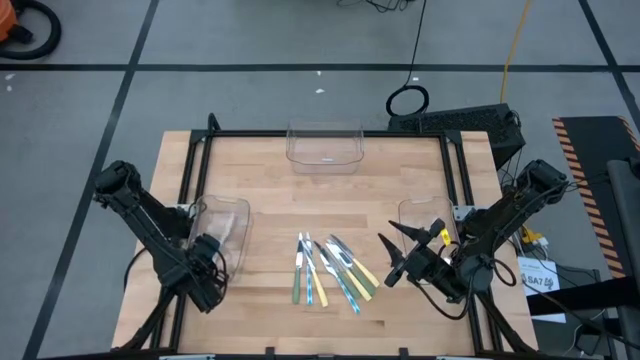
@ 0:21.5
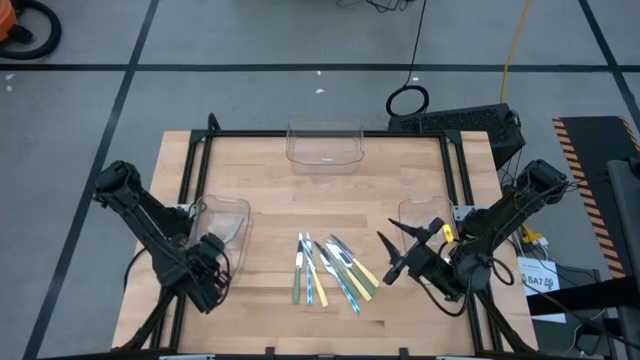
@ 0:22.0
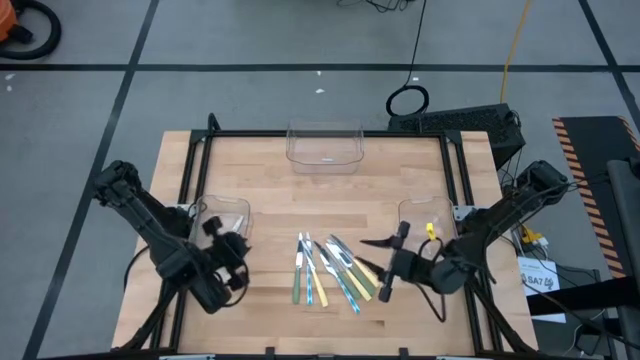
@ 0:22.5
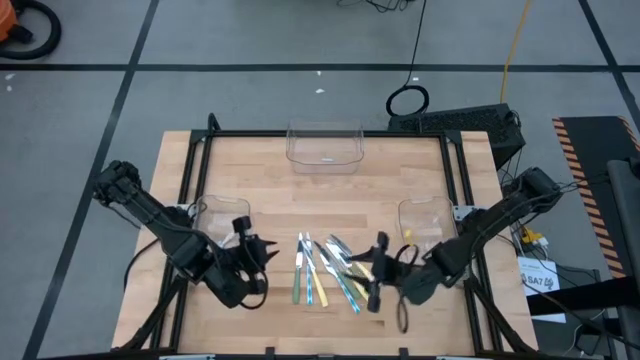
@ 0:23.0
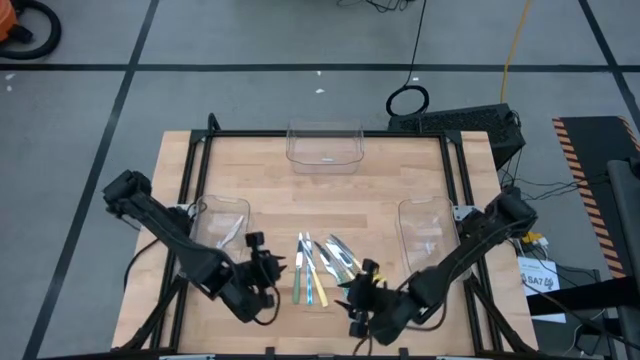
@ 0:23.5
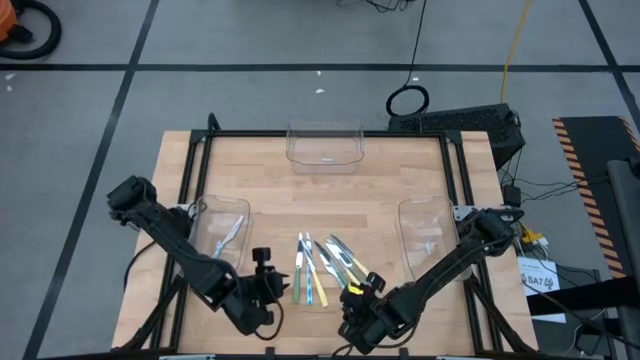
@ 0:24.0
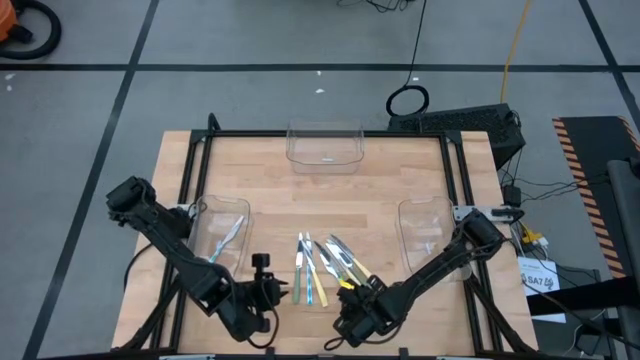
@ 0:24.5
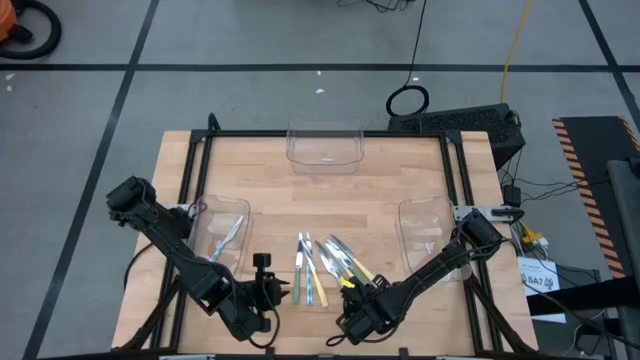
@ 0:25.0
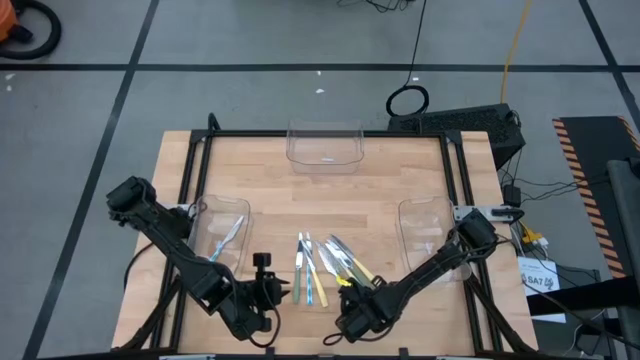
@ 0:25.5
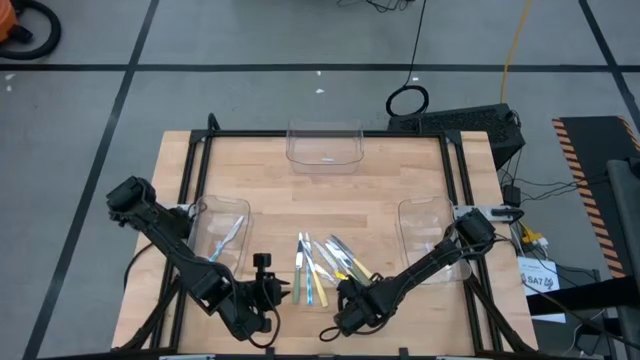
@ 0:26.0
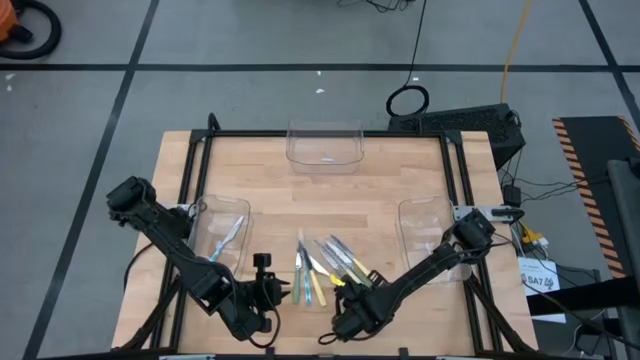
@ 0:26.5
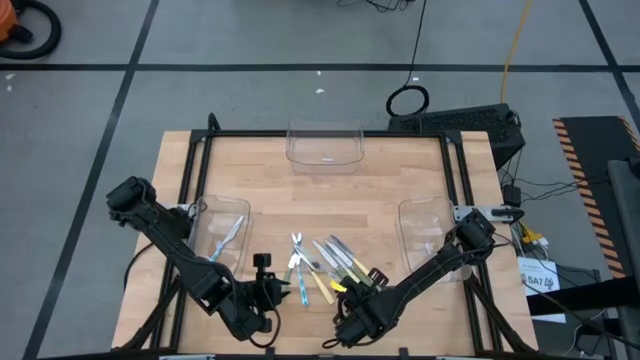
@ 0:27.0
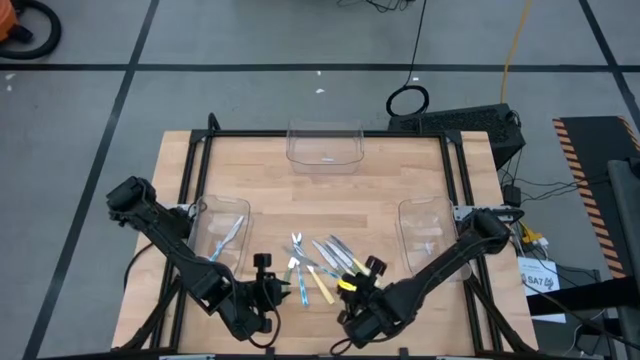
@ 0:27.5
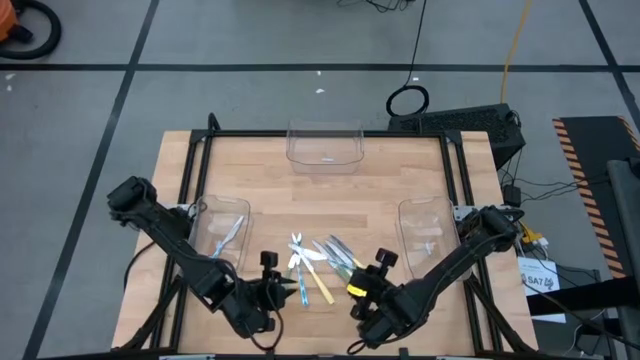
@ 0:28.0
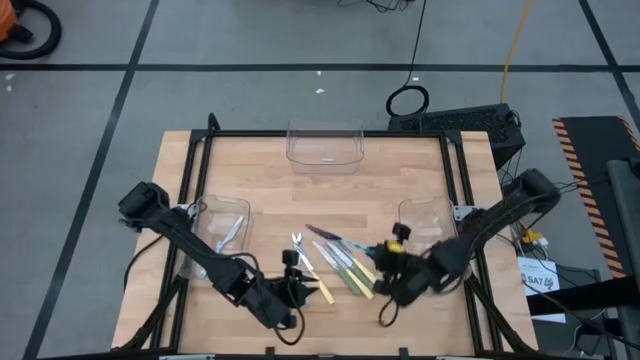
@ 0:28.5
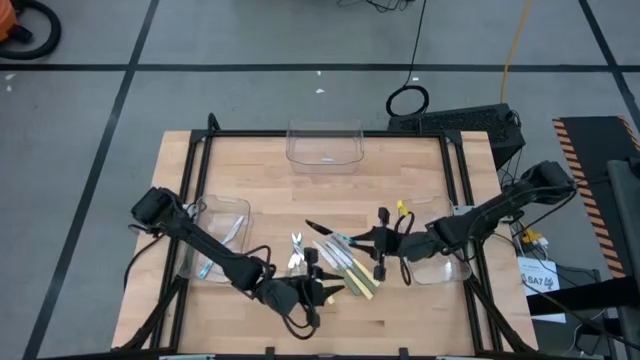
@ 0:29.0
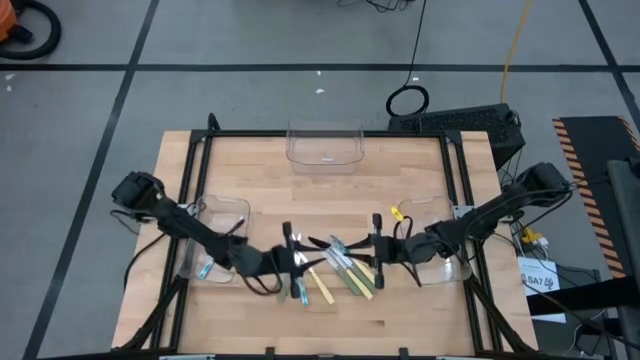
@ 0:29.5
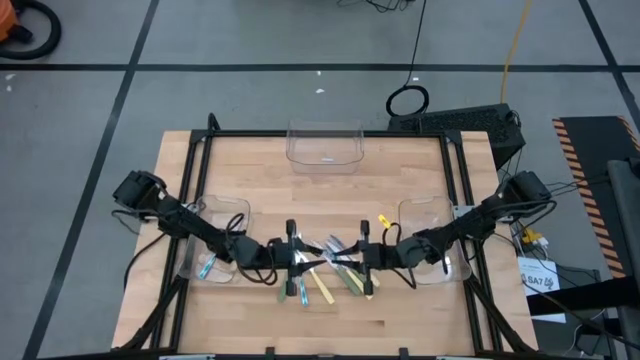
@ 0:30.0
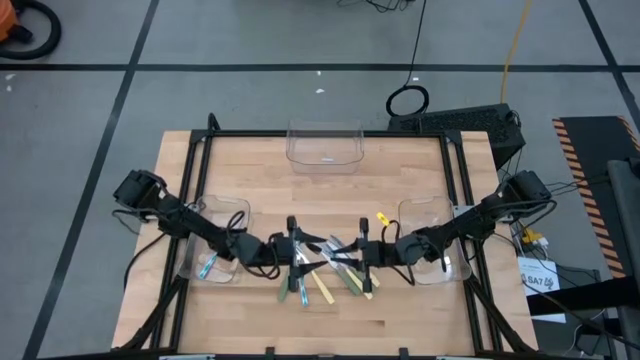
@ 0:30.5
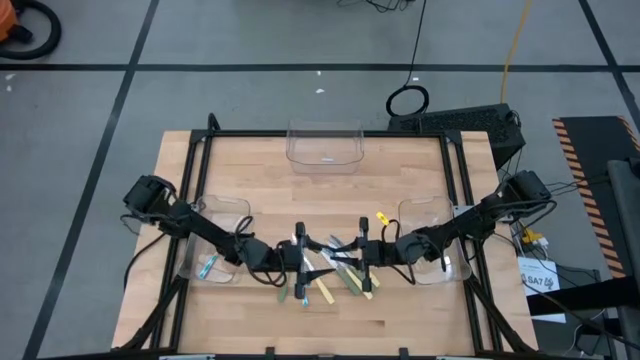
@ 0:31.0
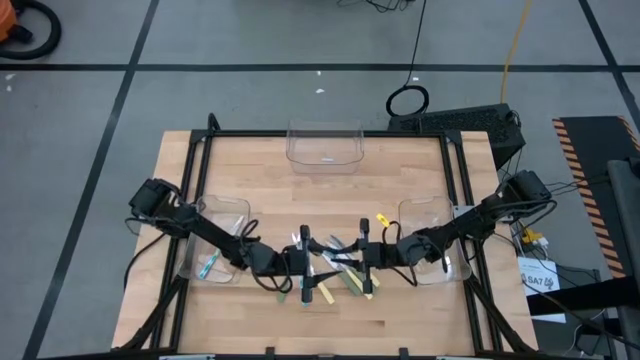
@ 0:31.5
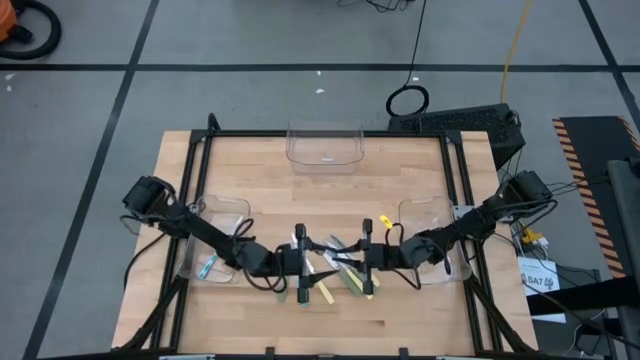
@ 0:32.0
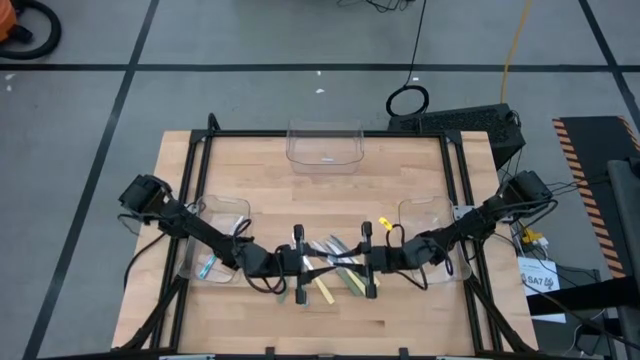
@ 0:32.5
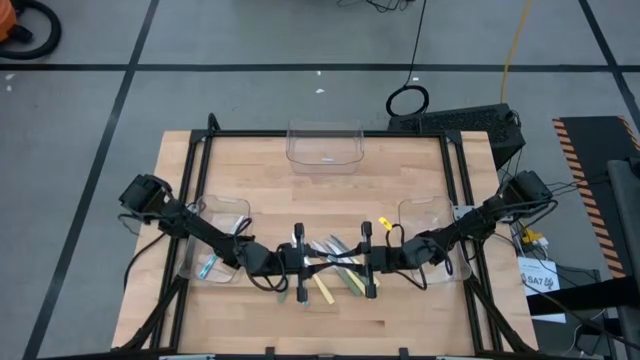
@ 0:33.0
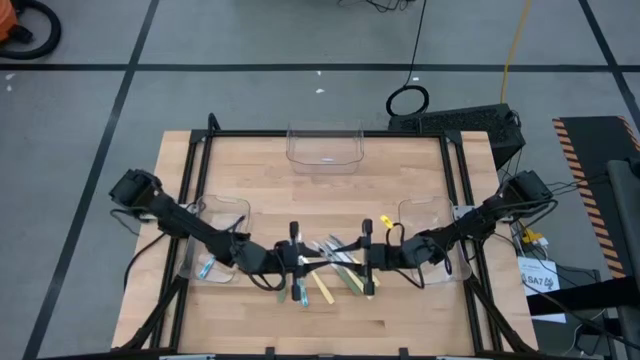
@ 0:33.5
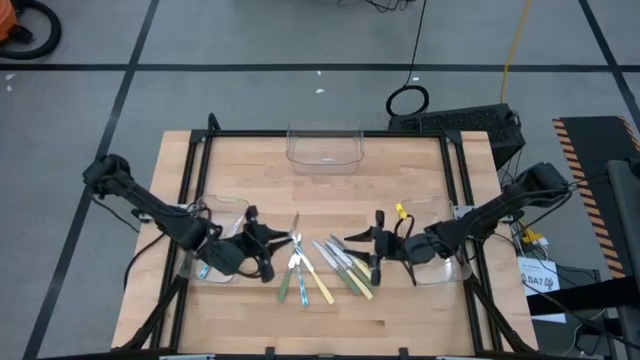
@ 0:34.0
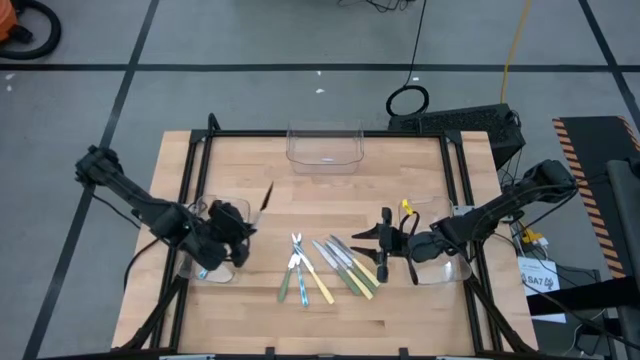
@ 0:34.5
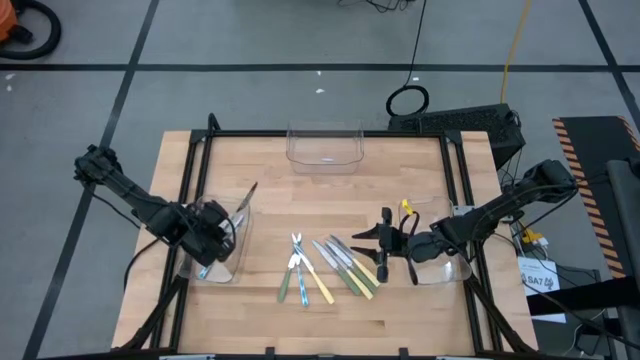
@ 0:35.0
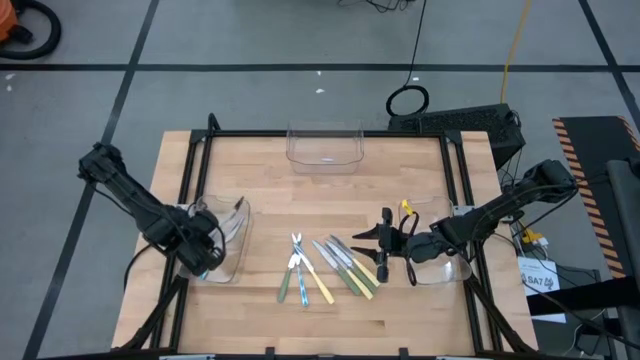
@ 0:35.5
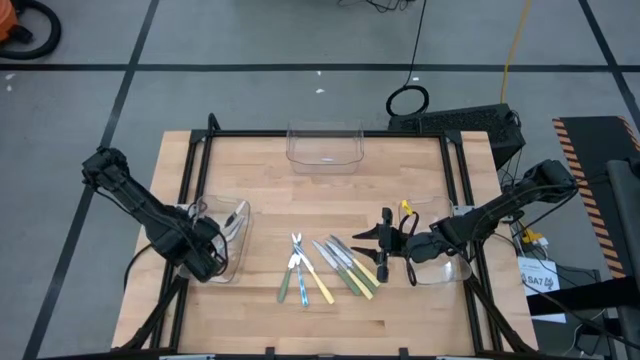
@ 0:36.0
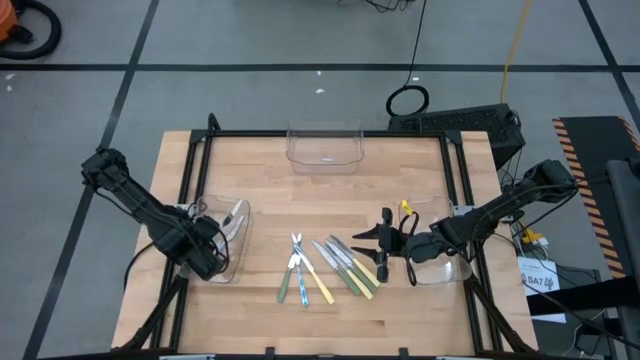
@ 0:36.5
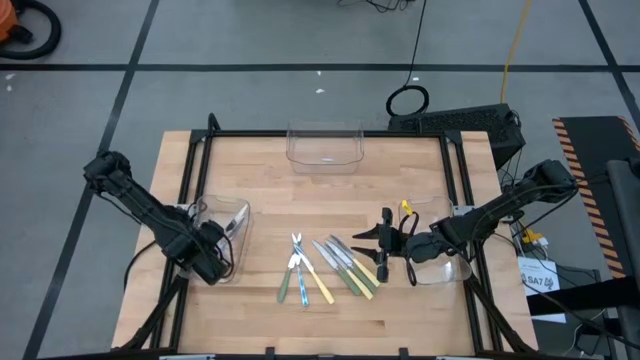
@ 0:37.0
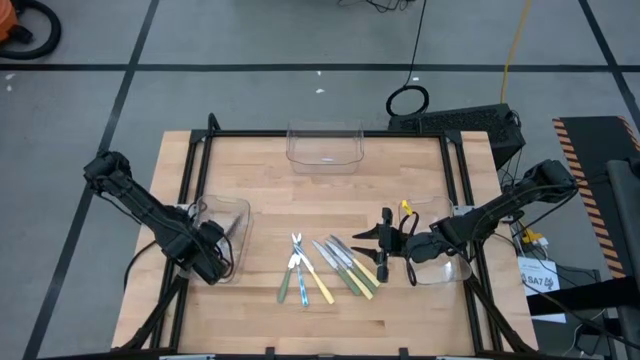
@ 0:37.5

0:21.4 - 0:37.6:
Task: Sort silverware by color (type)
Put the right white and blue patterned knife into the bottom left transparent bin

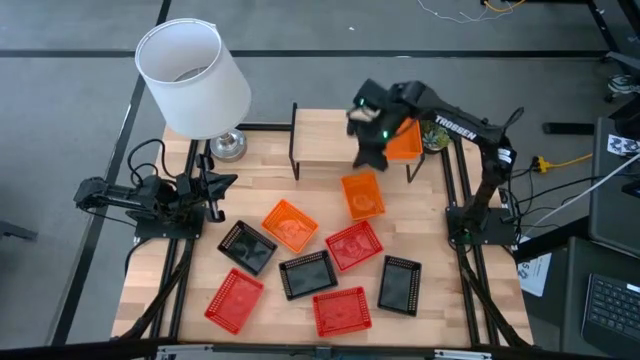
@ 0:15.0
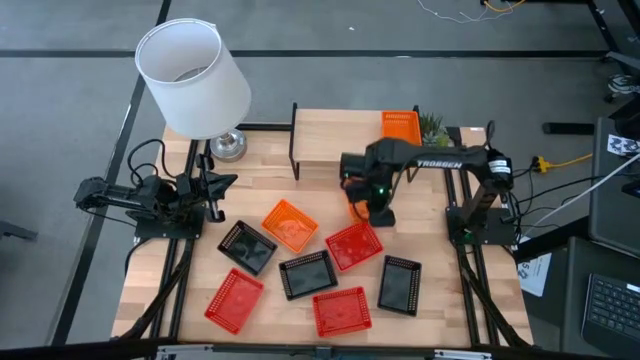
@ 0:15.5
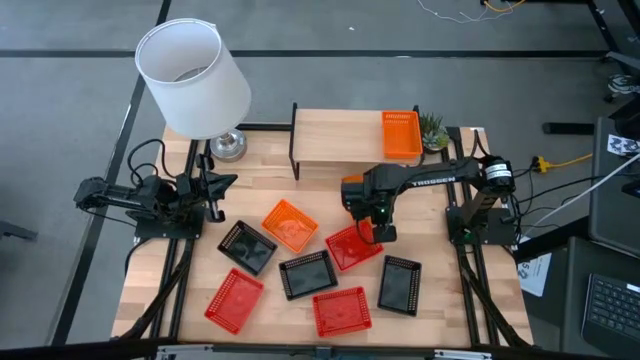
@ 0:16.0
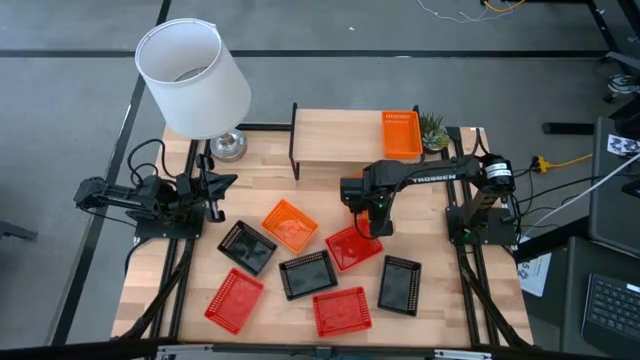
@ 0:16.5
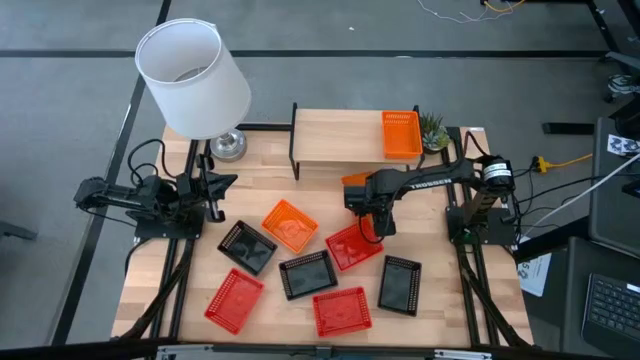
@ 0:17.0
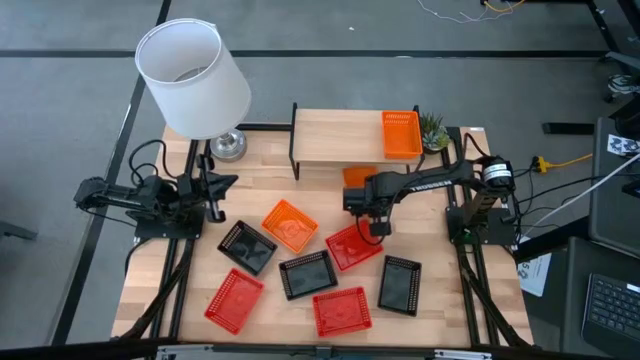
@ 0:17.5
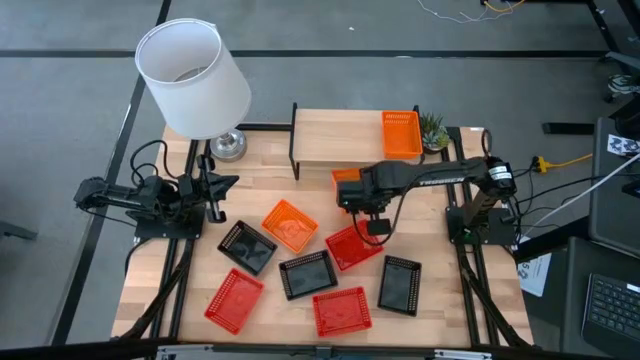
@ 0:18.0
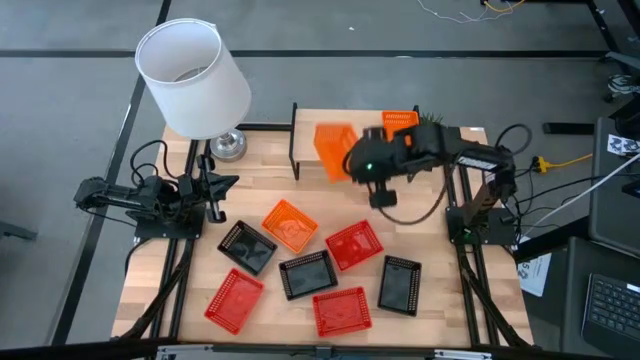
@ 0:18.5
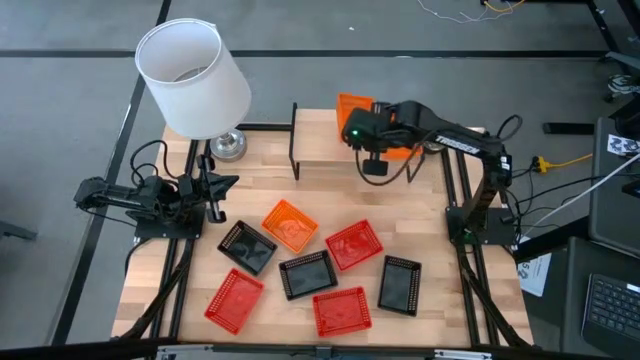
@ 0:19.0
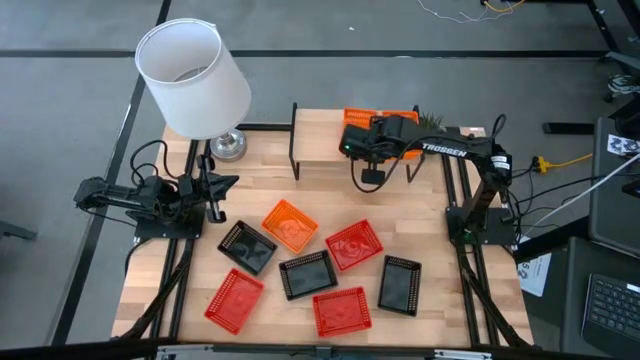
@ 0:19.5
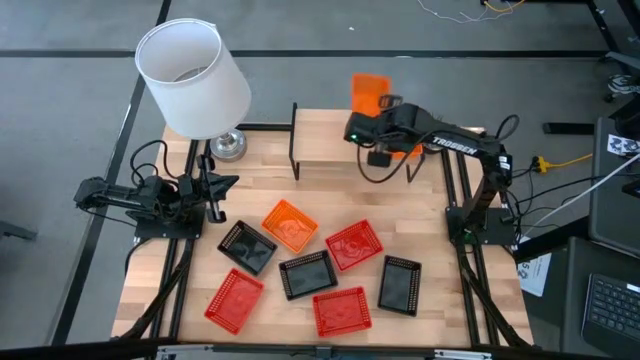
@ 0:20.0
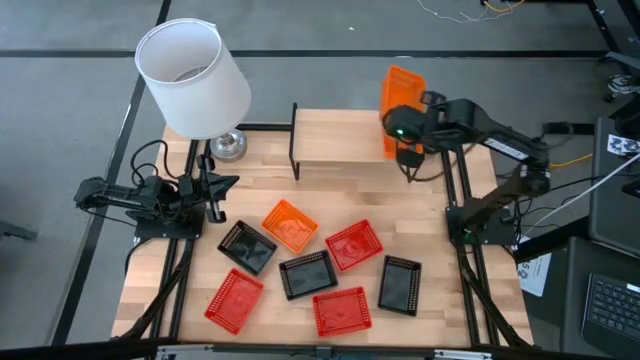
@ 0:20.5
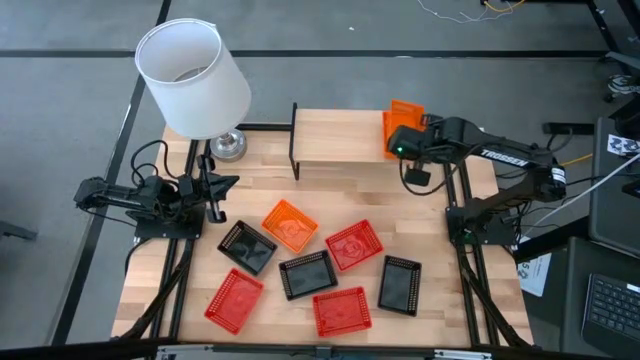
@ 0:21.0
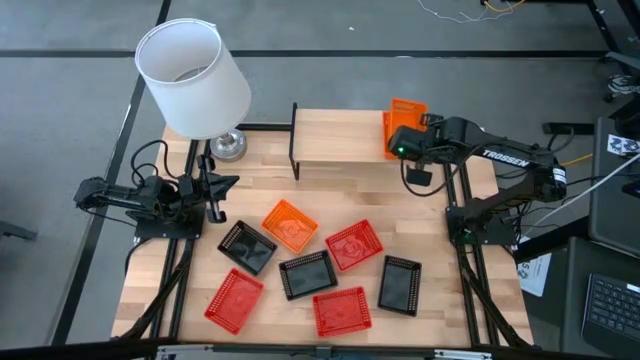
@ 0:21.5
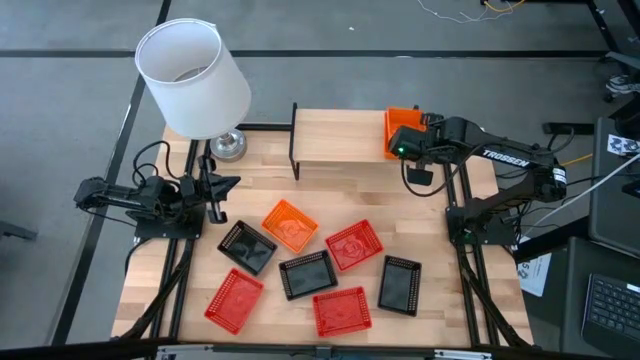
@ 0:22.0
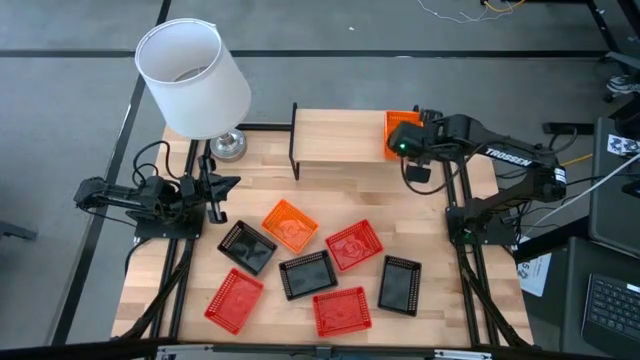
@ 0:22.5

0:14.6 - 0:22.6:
Task: Stack baskets on shelf by color
Stack the right orange bin on the other orange bin on the shelf
